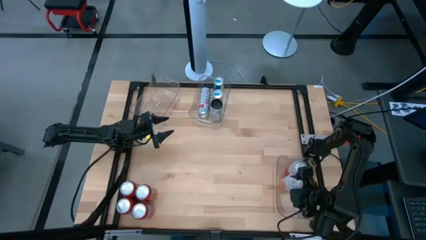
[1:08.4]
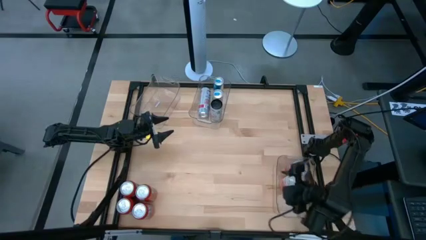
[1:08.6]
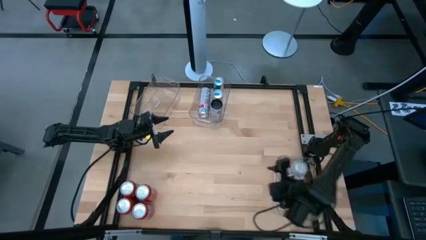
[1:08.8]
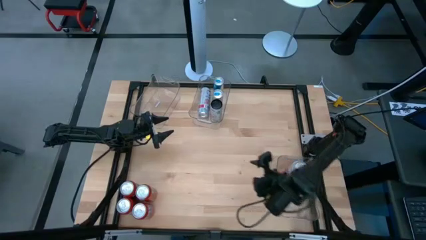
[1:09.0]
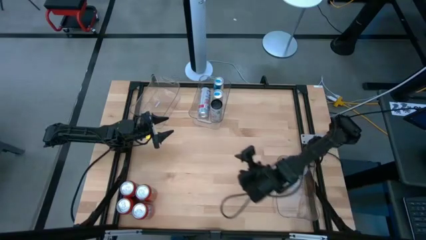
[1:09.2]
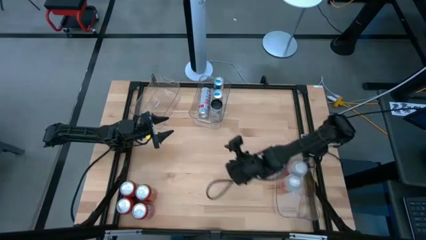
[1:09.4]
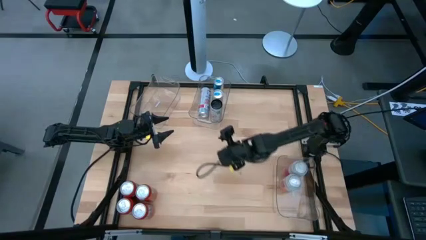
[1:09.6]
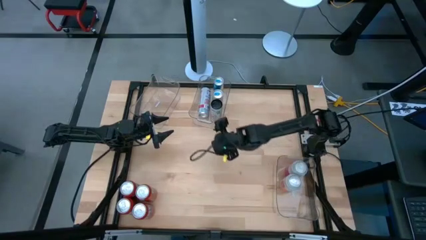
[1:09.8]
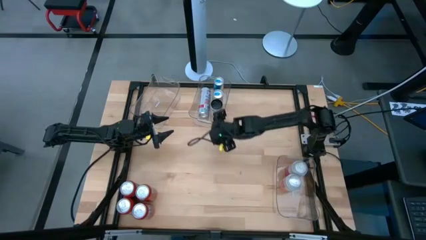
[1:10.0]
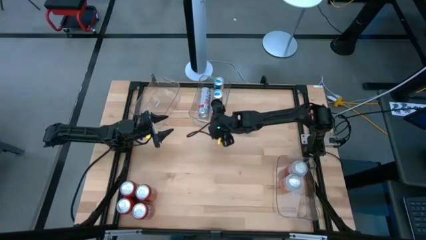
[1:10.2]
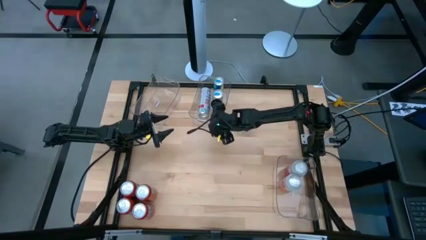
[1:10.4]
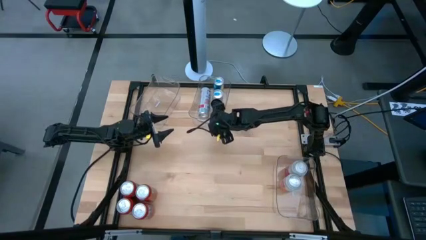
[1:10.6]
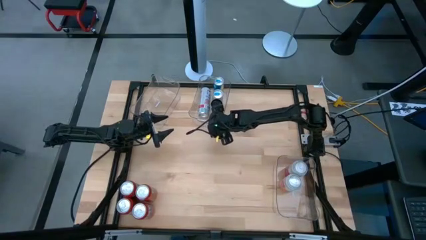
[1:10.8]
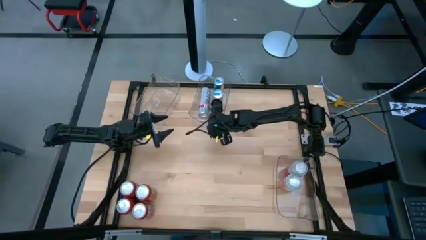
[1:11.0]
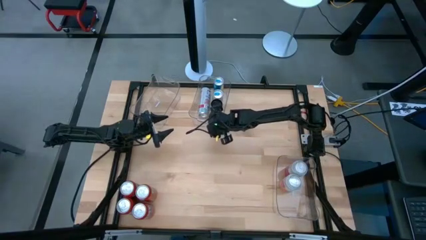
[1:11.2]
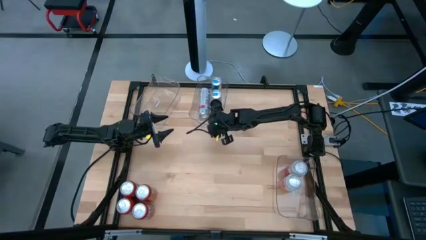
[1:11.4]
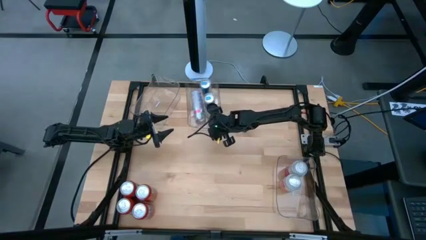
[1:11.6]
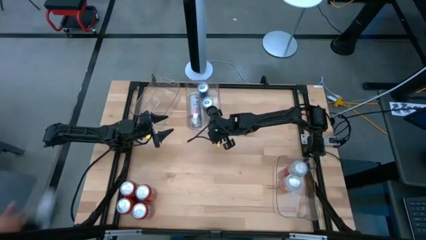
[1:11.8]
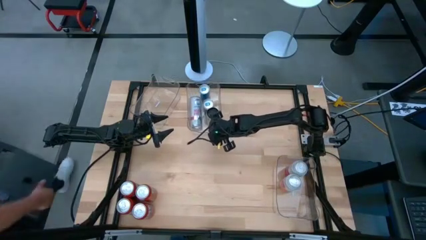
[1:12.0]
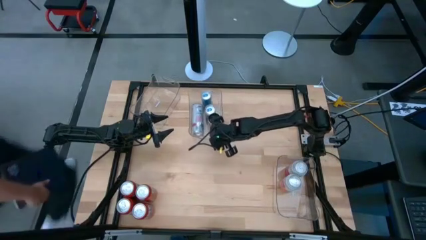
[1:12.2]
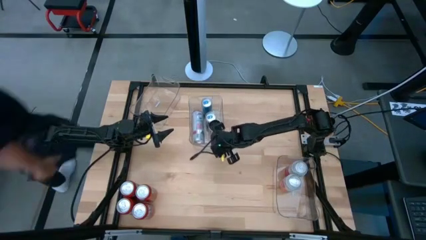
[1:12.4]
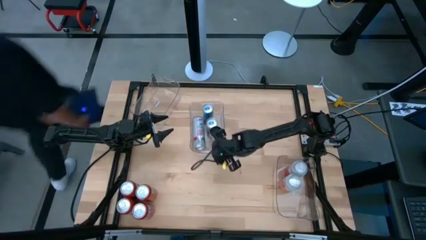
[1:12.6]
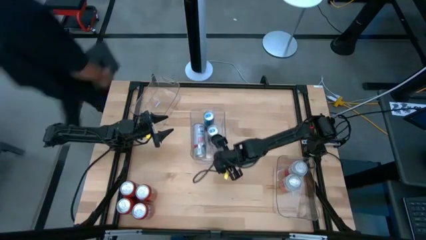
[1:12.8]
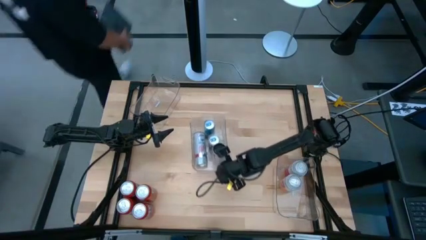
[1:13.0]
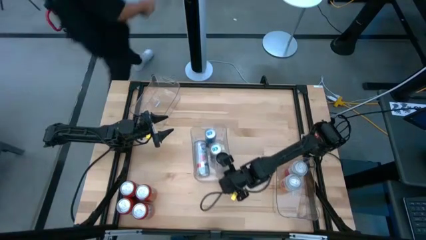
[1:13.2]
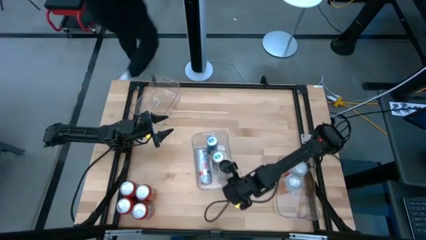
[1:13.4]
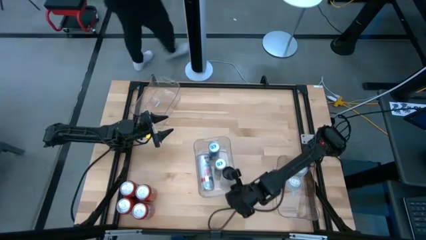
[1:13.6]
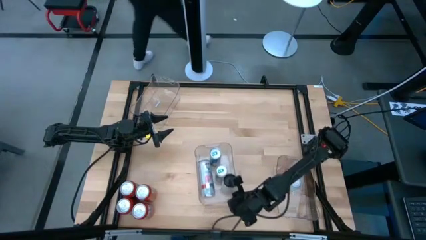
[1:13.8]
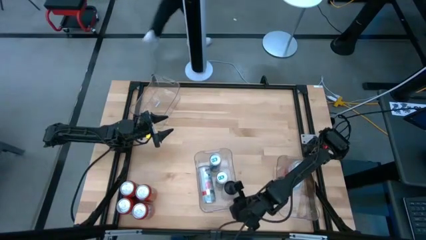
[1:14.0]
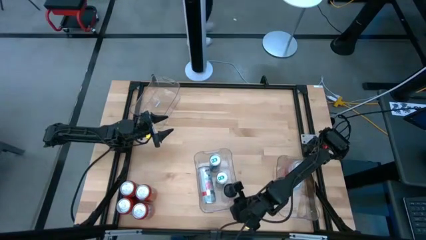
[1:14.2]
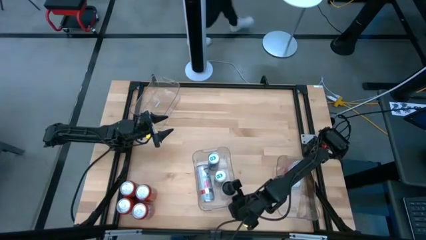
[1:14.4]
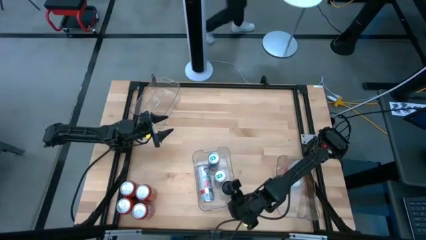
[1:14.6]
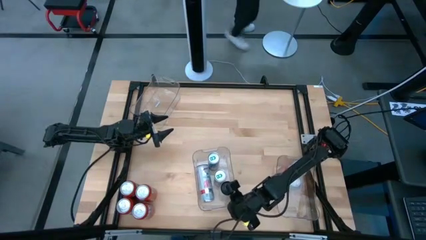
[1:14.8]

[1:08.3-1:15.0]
Task: Sort soda cans
Move the top middle transparent bin to the bottom of the table

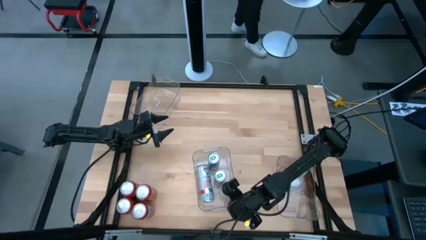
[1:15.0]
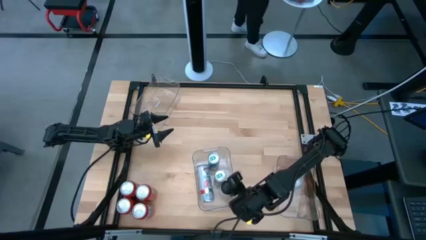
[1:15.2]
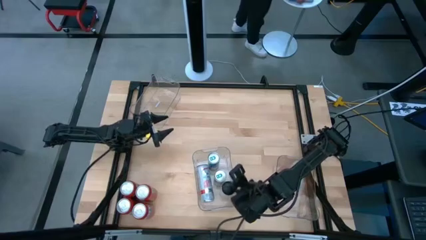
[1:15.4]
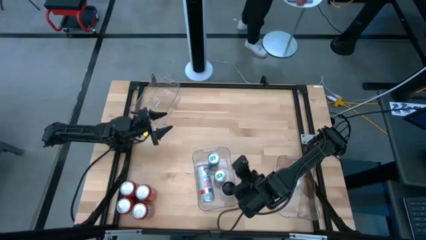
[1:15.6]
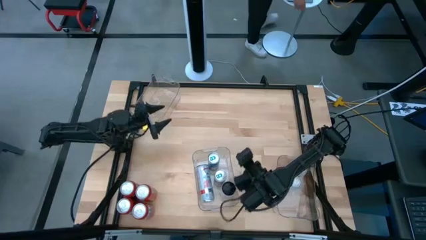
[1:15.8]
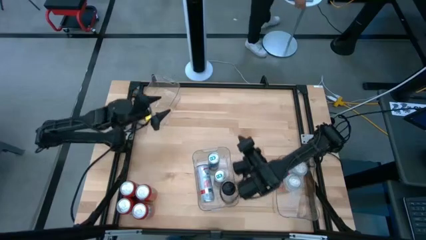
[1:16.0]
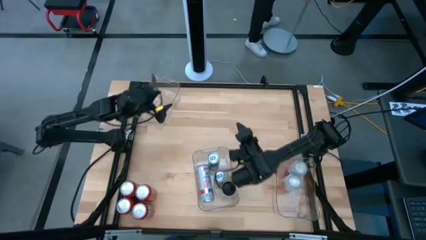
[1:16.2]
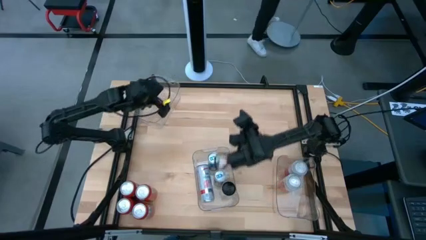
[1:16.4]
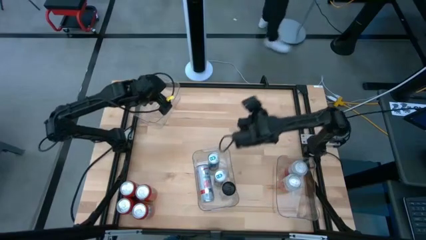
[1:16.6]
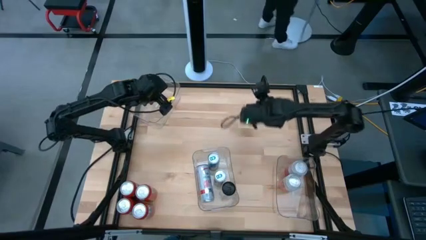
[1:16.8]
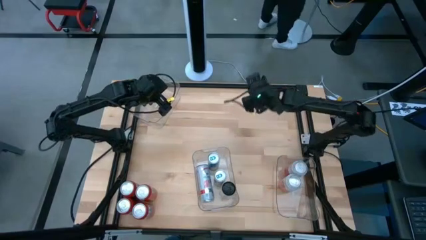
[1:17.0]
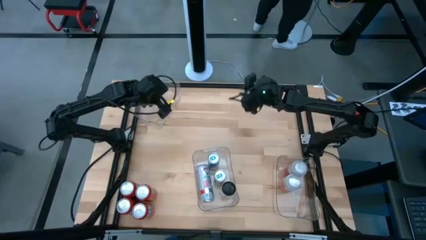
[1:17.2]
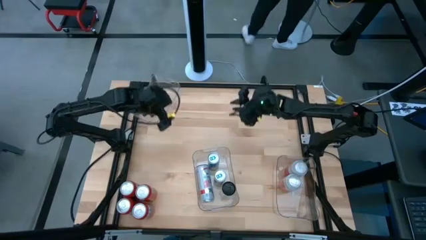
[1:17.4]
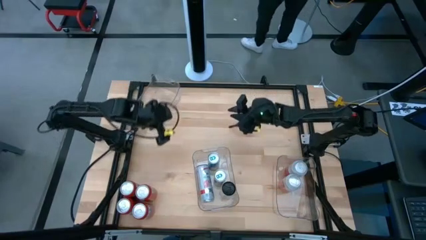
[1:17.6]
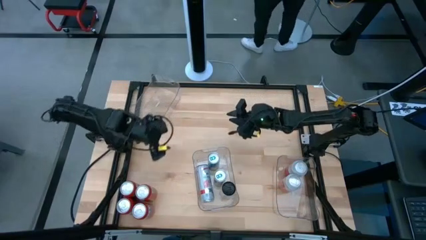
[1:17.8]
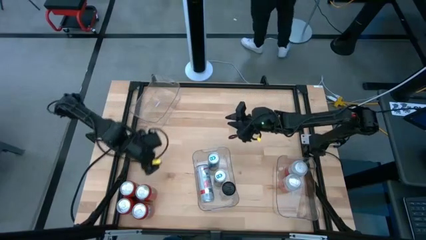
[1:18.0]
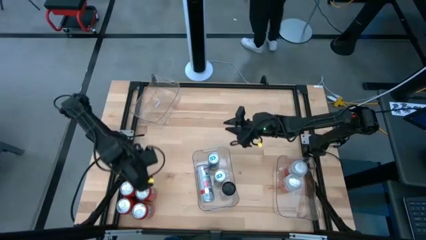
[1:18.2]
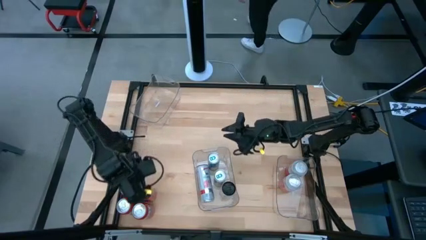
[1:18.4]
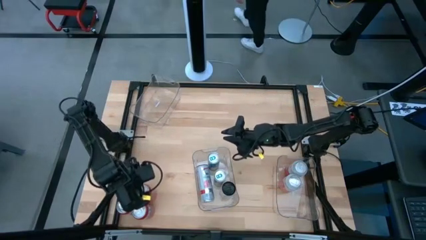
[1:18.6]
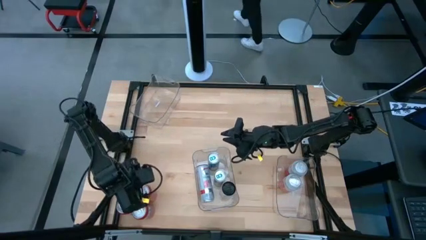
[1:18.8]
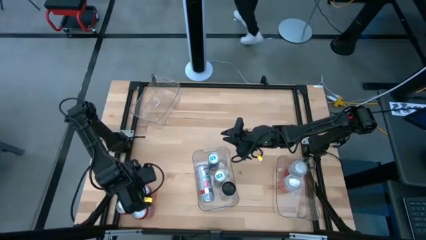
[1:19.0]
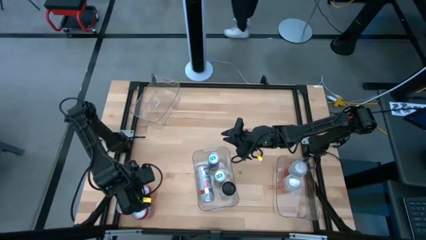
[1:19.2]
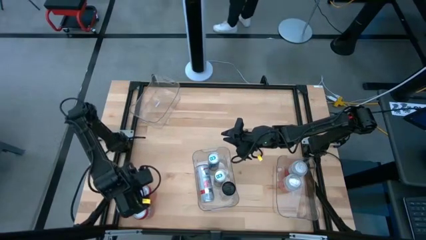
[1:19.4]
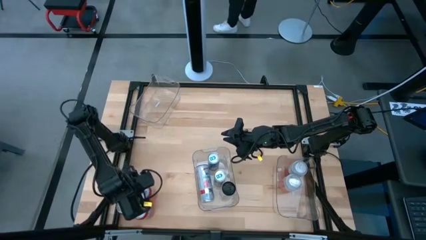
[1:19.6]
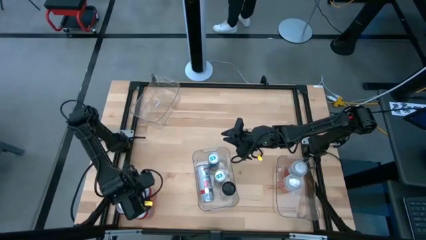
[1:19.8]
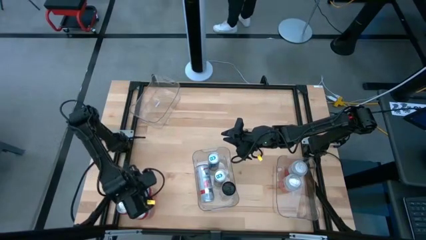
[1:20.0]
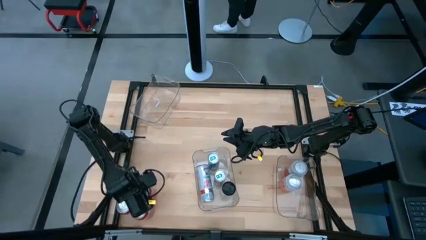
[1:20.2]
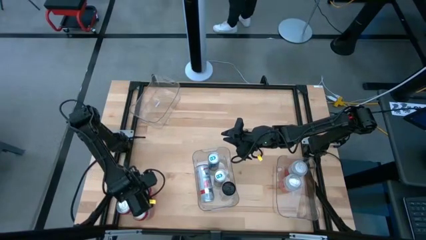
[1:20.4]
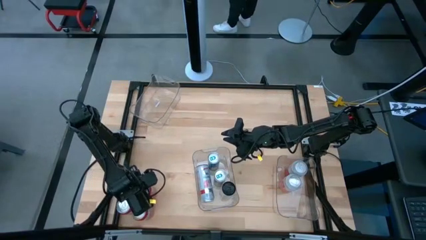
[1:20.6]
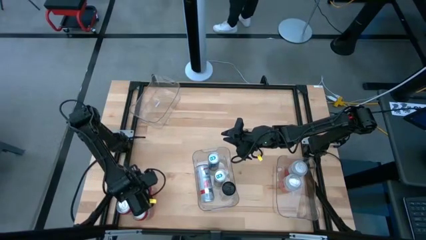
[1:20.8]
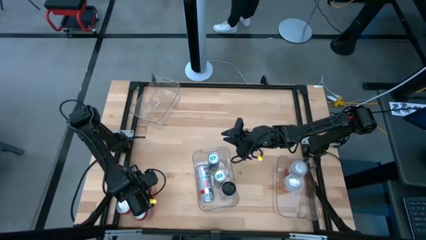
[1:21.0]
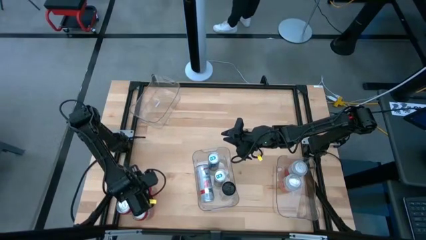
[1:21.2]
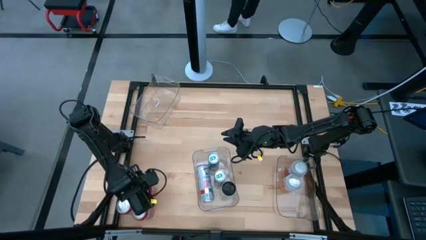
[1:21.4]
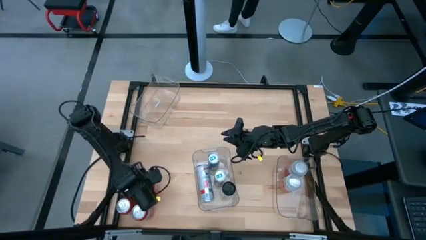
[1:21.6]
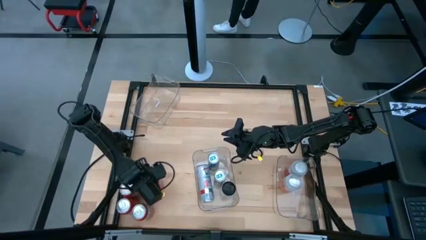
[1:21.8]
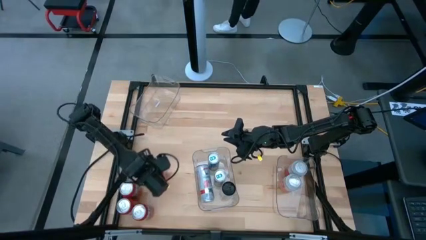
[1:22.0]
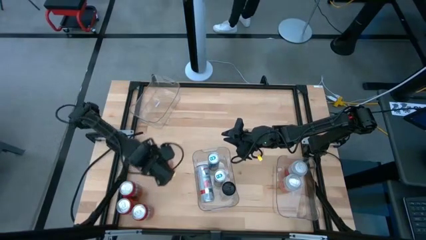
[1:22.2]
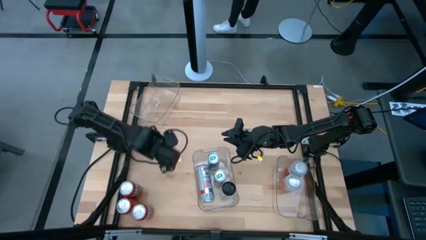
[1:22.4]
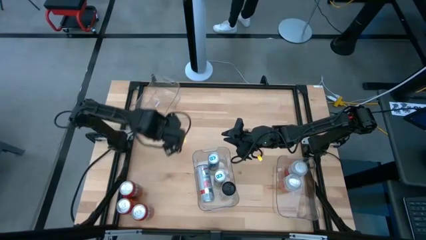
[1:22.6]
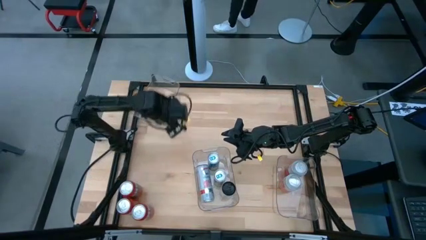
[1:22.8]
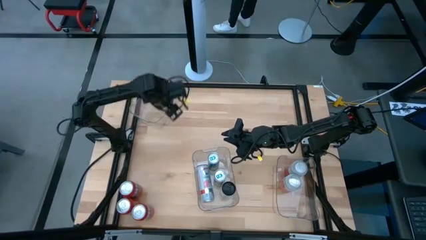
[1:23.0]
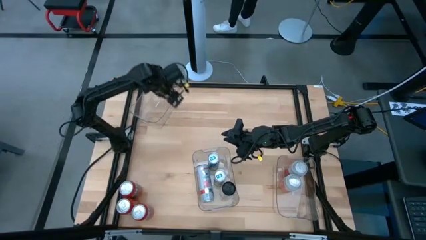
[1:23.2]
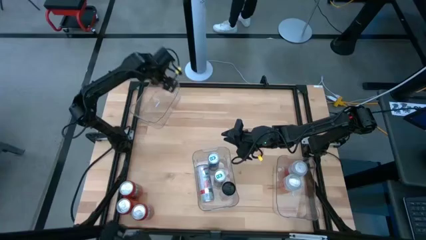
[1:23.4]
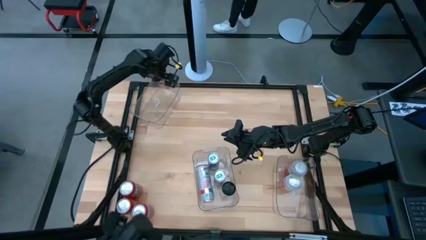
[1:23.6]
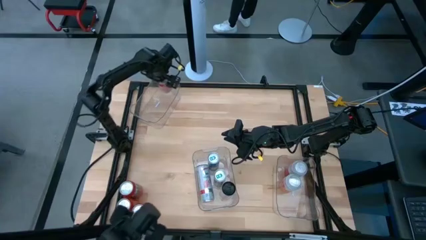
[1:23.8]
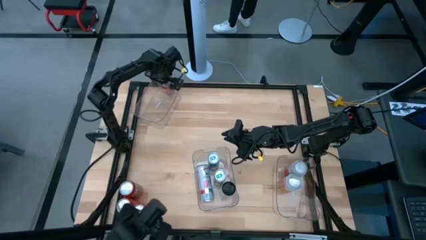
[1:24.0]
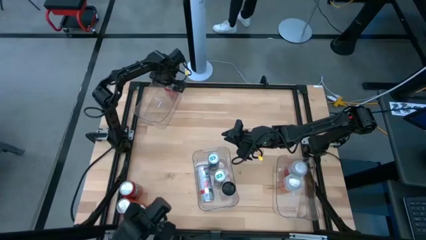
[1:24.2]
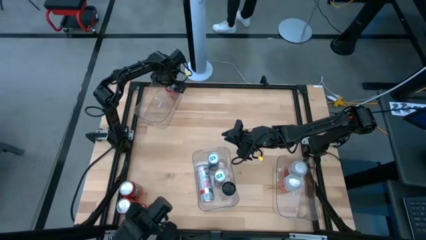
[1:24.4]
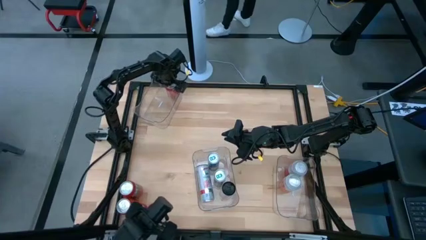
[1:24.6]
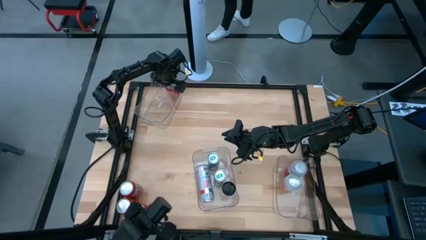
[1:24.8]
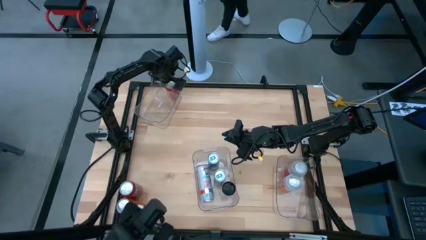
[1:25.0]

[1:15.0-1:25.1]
Put the orange soda can into the top transparent bin
